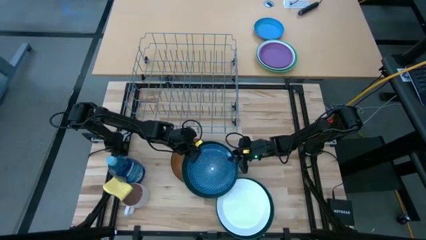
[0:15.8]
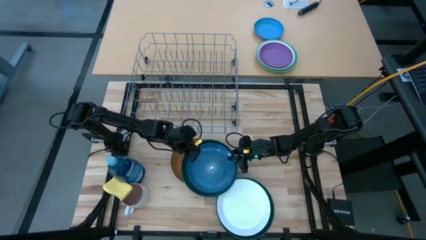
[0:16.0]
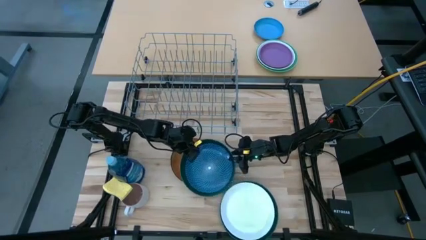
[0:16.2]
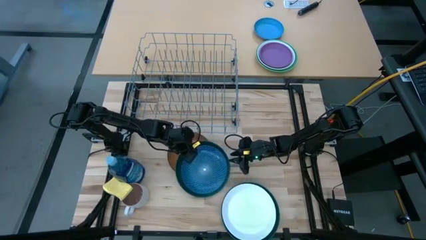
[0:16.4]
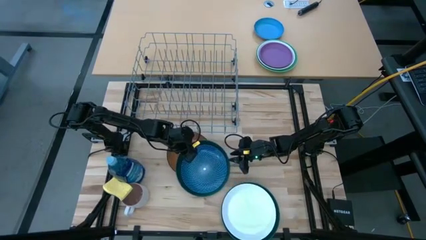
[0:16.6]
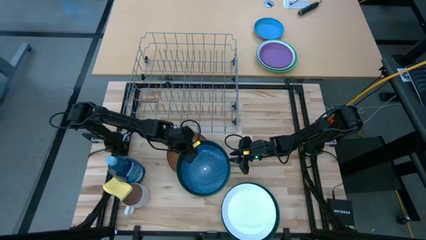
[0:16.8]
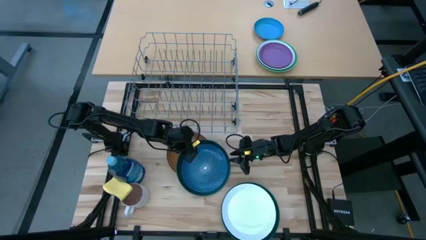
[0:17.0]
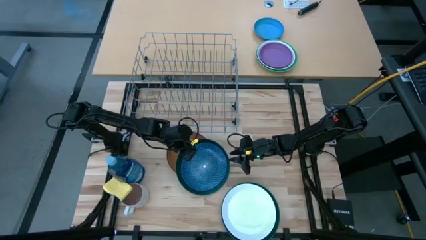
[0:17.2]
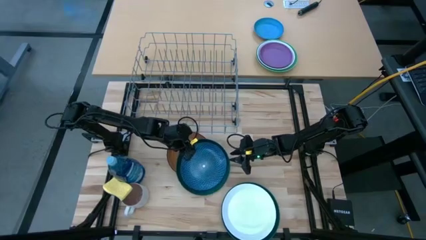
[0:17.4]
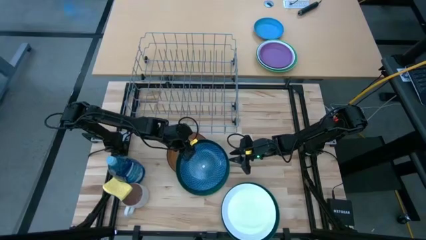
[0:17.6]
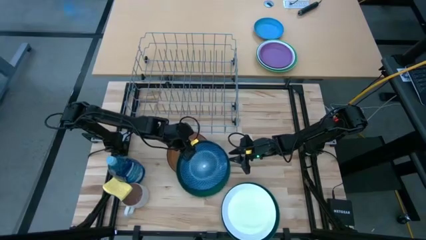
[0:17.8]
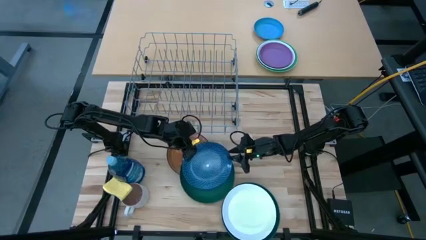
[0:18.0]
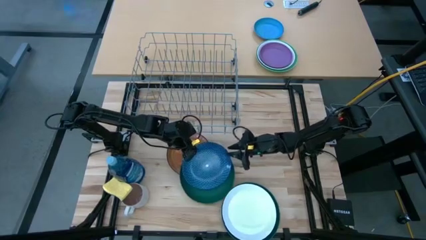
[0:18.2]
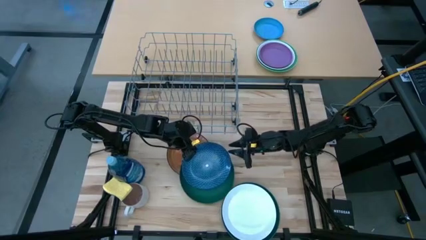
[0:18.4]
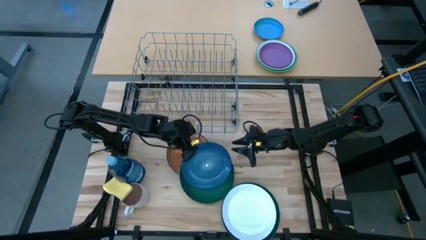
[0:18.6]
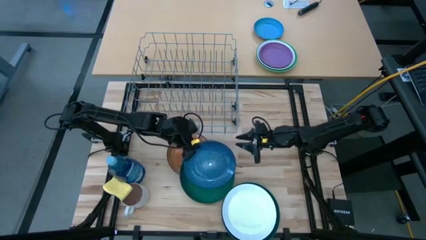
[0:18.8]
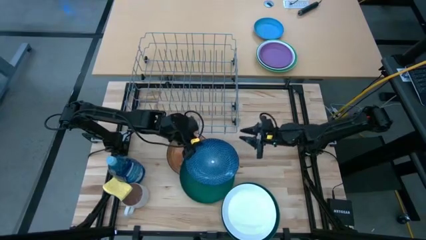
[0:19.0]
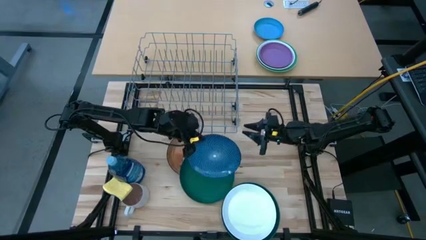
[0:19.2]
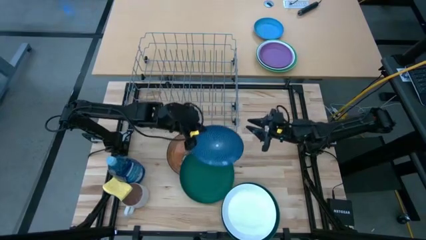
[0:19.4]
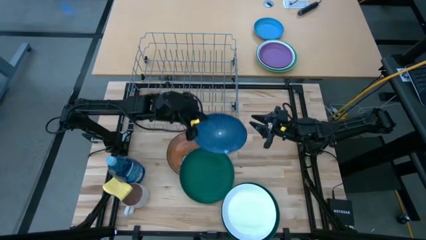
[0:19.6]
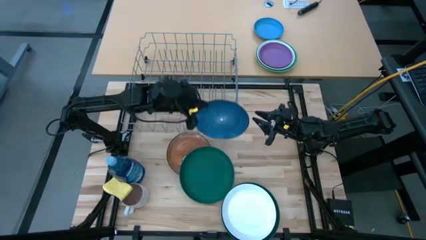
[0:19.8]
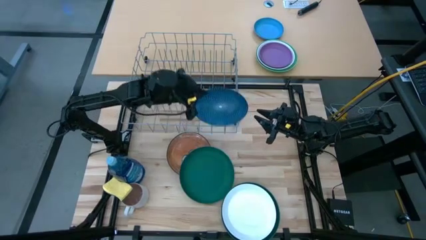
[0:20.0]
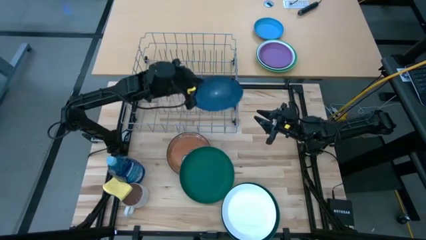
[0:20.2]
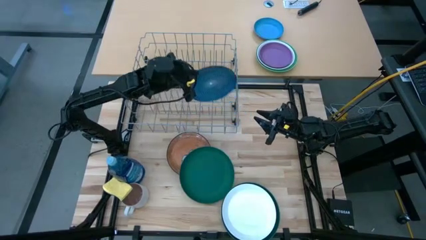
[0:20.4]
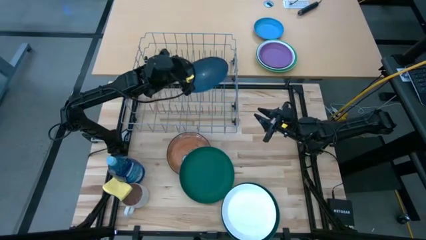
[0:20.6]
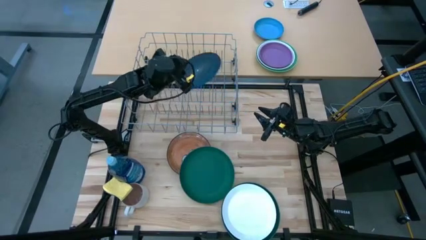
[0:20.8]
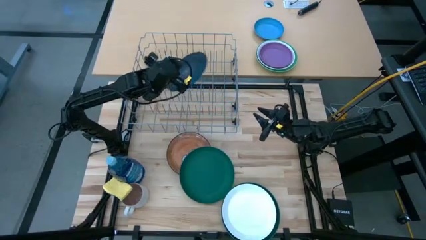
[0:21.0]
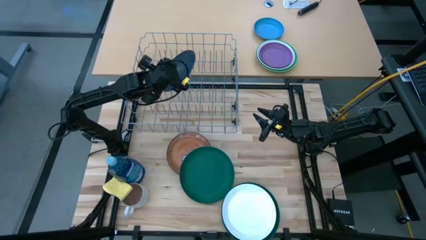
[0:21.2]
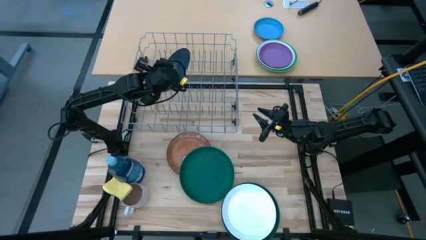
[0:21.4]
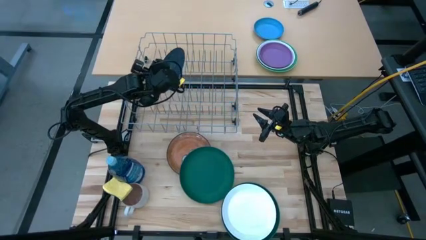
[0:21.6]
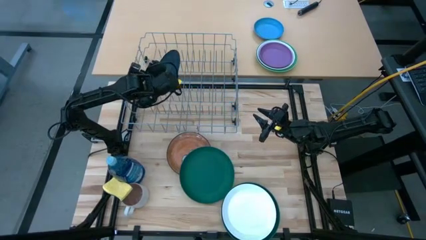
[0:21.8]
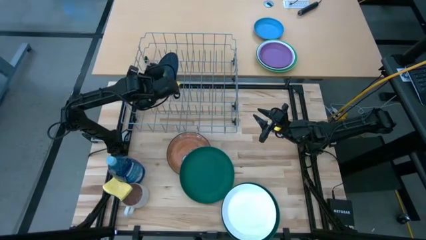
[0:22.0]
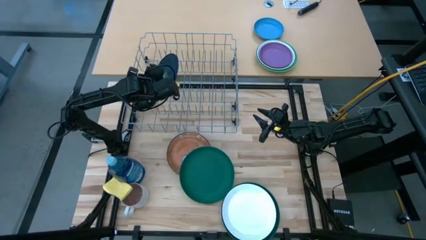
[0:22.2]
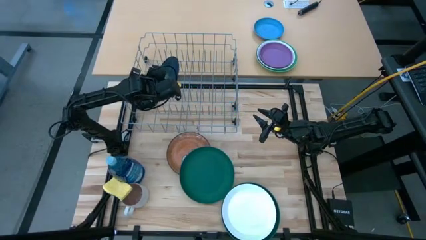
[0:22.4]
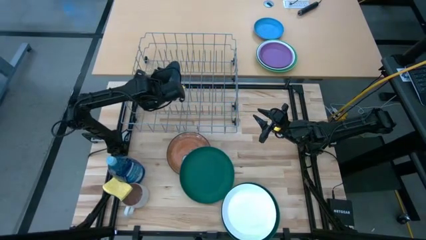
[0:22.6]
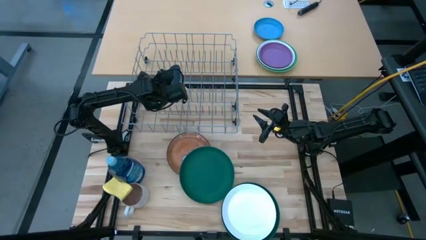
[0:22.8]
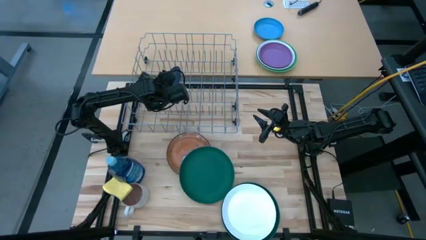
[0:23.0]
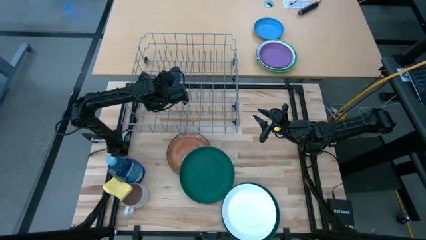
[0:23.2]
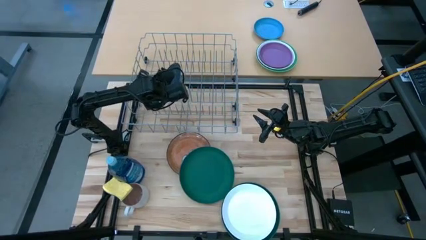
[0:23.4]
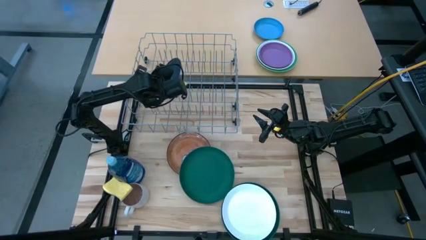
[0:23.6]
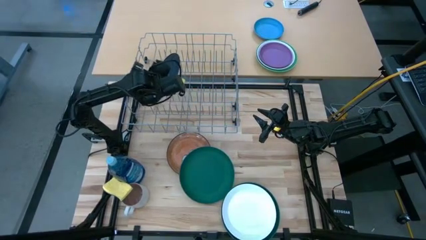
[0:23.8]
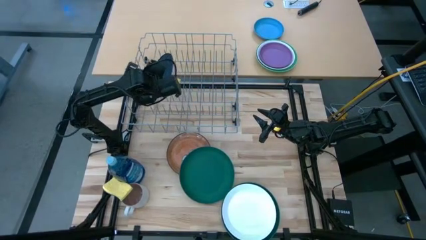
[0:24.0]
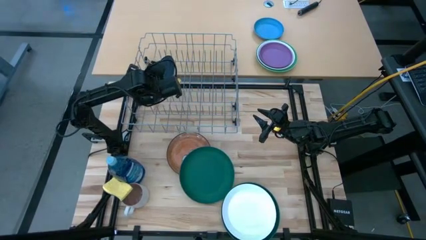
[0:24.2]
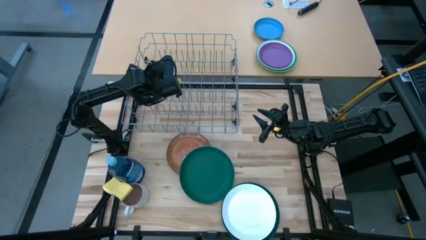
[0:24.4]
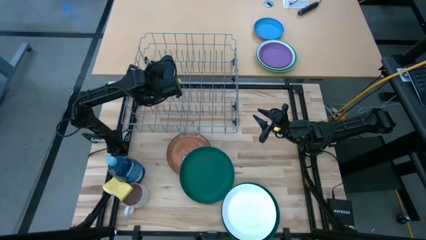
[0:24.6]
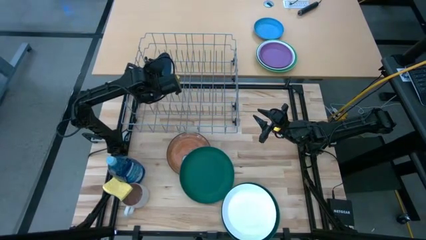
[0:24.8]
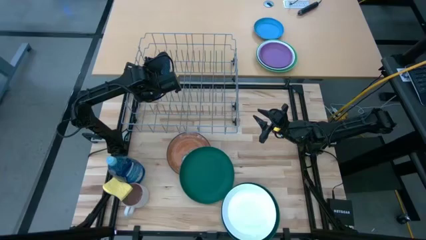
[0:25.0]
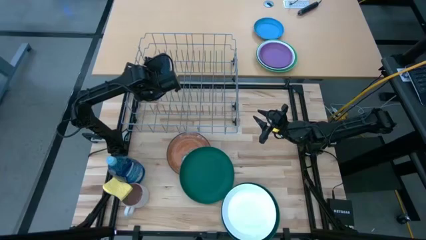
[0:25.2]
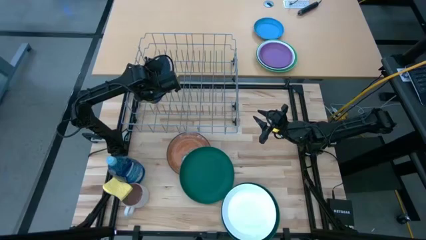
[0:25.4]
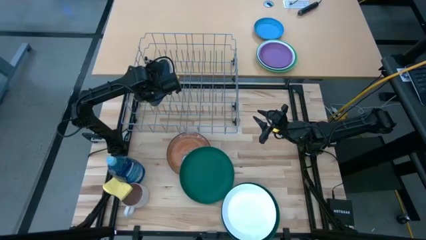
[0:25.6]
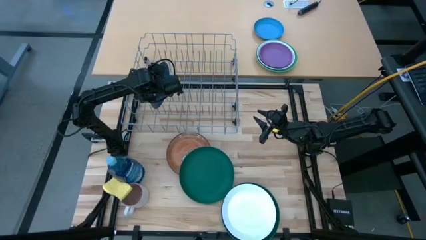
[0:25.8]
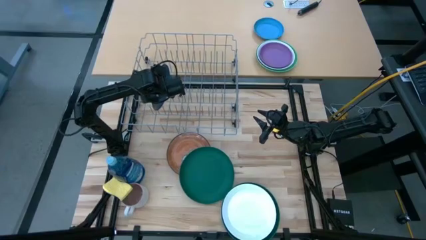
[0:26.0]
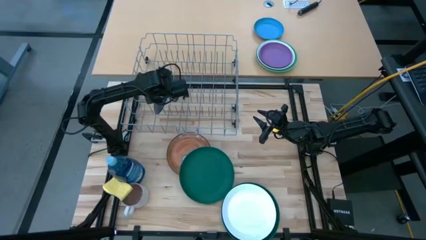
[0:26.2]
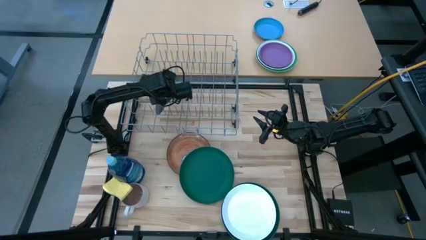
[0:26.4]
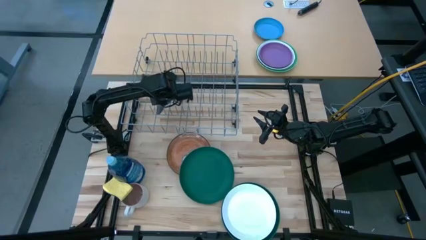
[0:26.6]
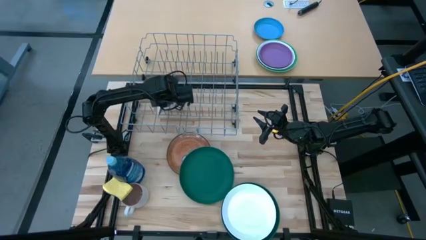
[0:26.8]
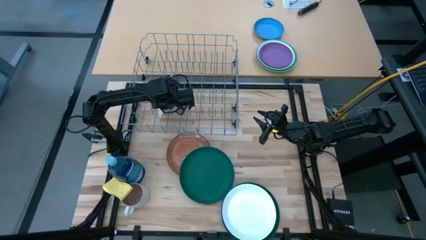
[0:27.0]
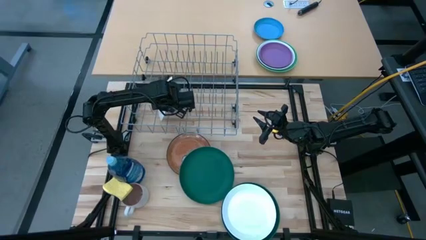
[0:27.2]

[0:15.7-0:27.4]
Task: Sort dishes
Put the blue plate on the dish rack
